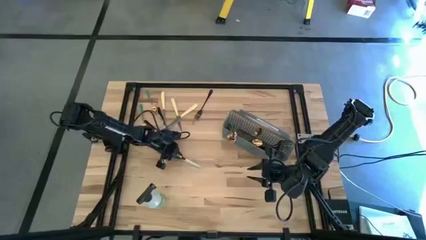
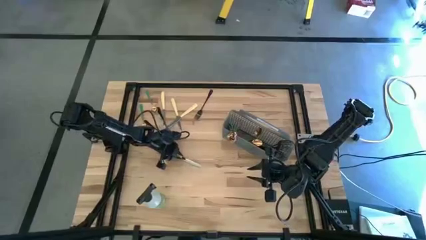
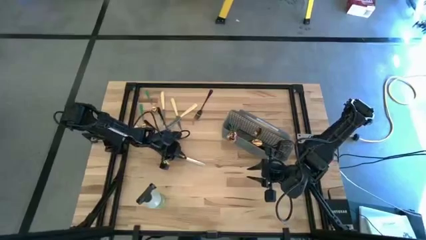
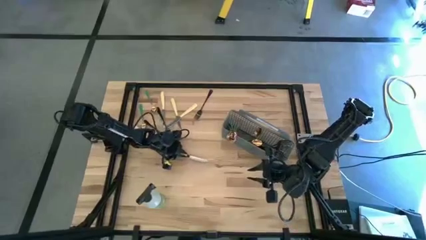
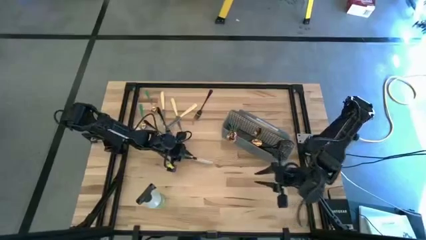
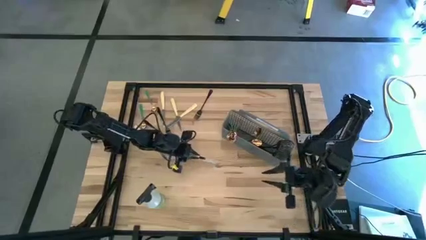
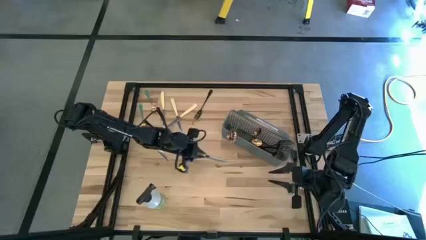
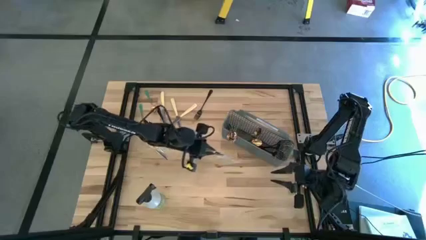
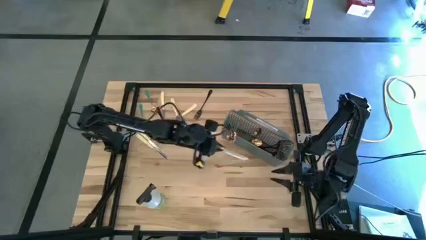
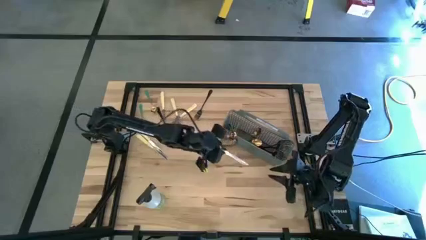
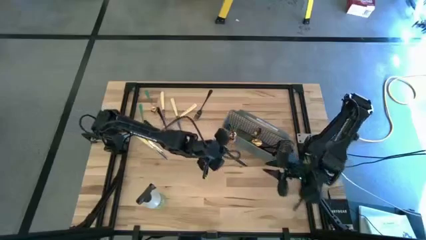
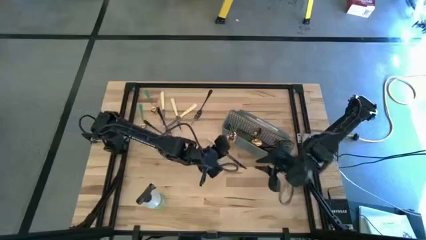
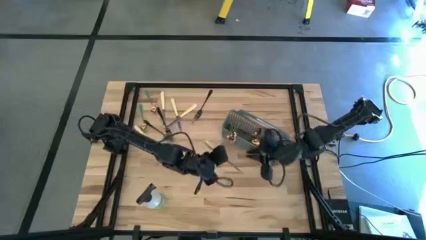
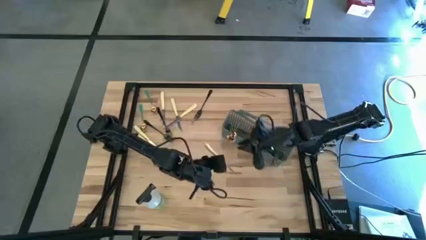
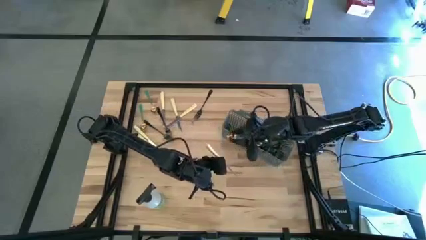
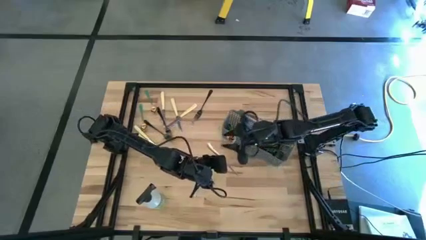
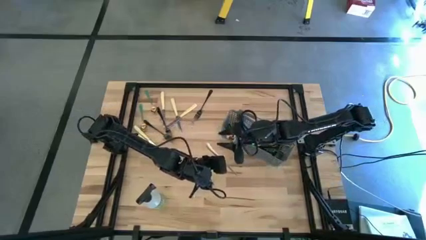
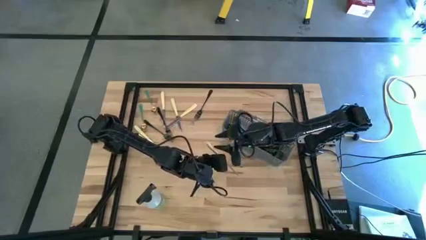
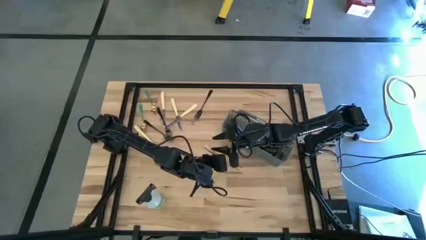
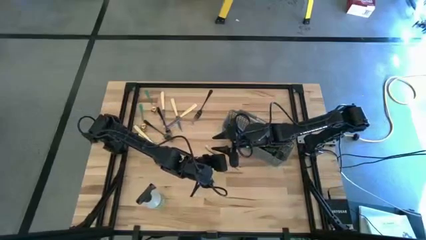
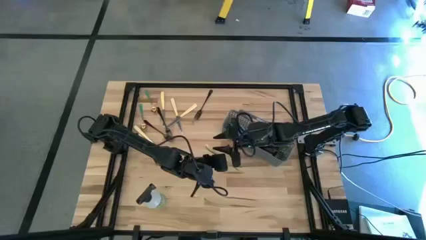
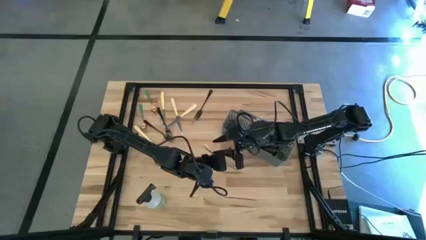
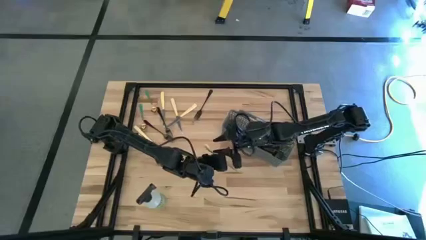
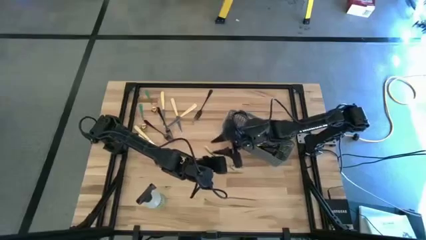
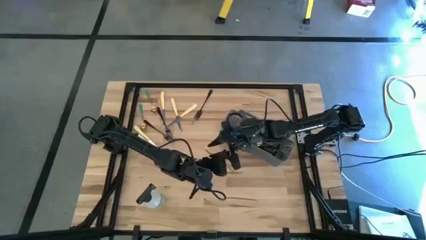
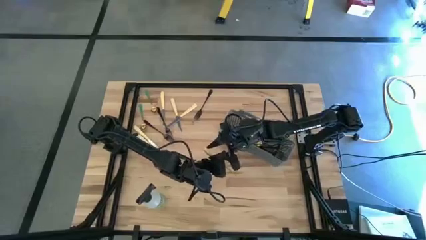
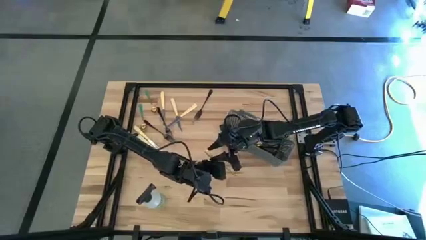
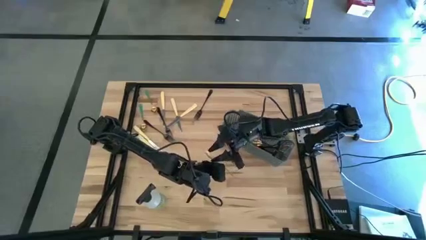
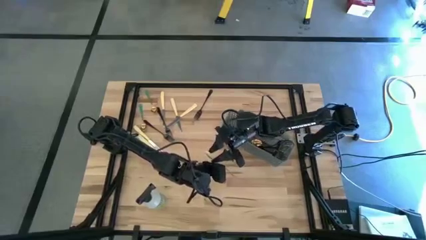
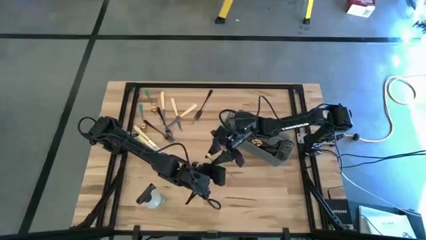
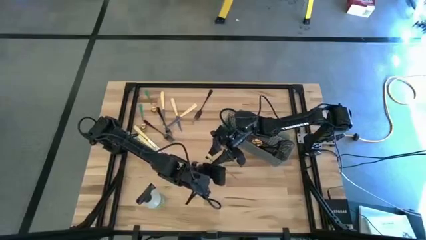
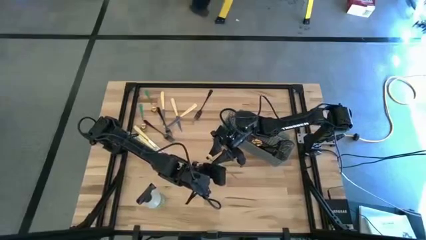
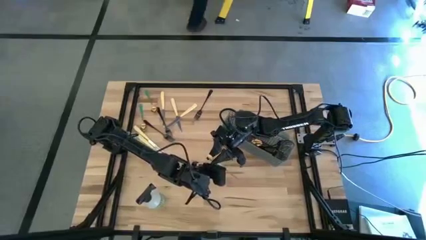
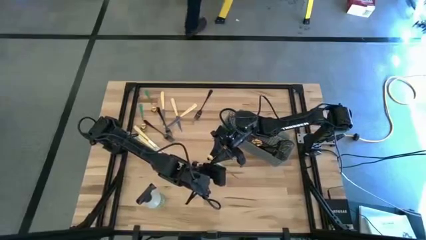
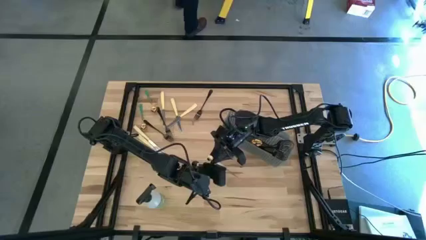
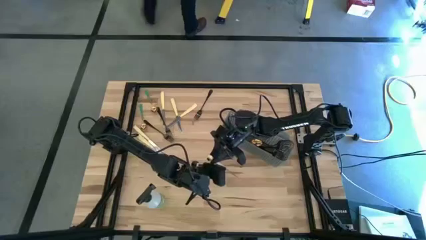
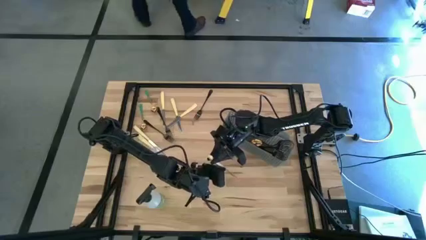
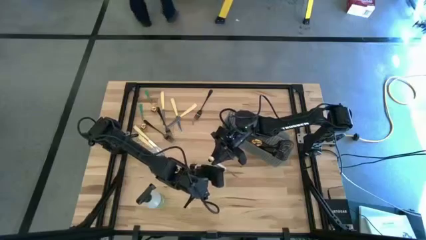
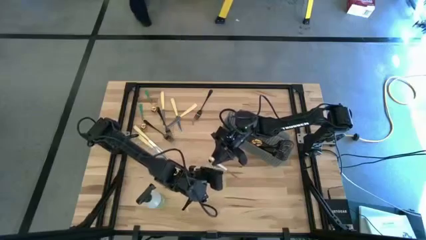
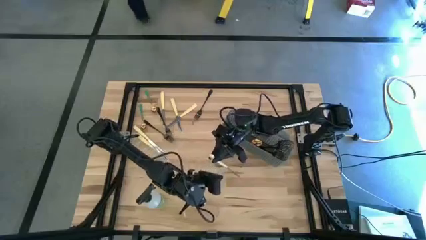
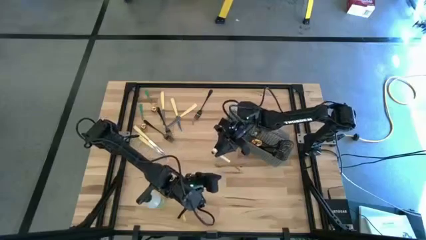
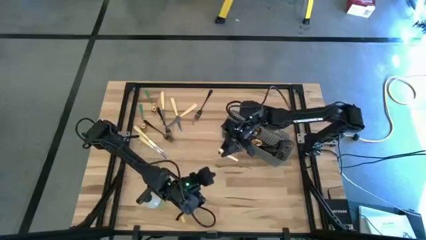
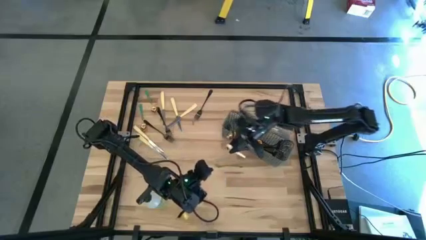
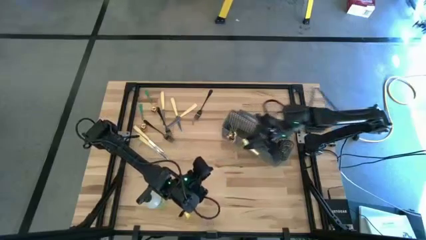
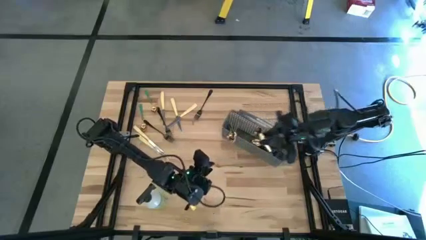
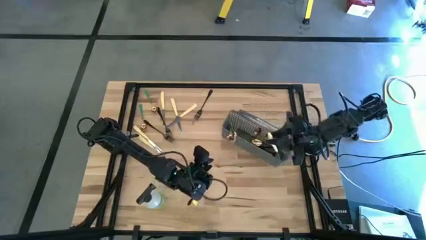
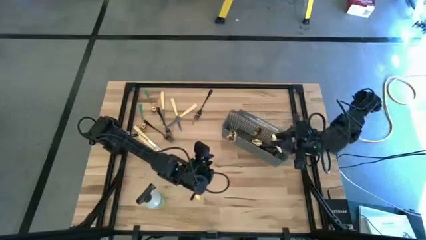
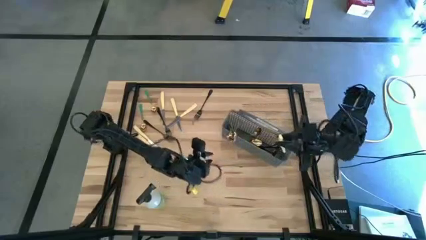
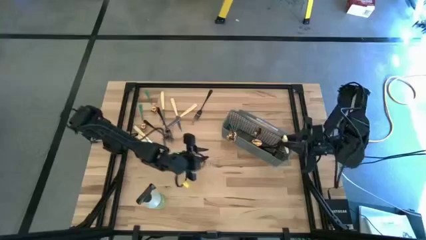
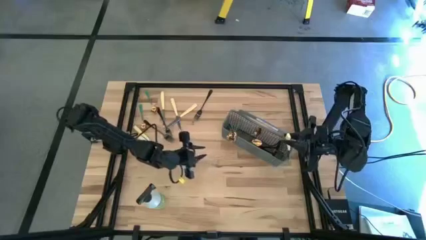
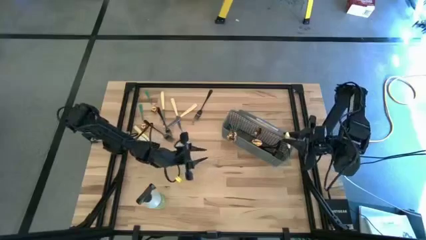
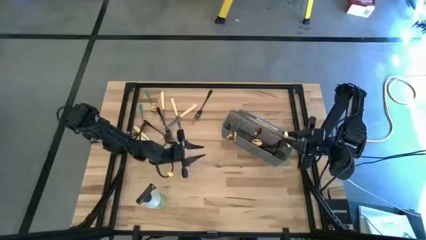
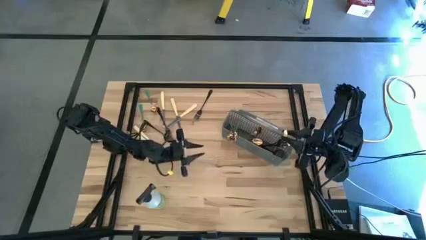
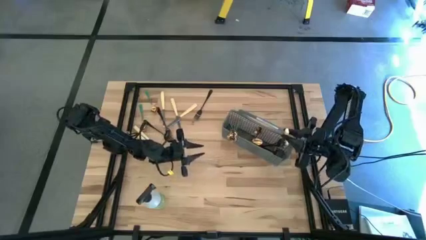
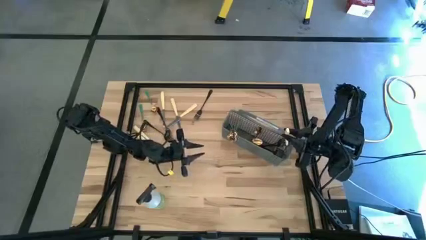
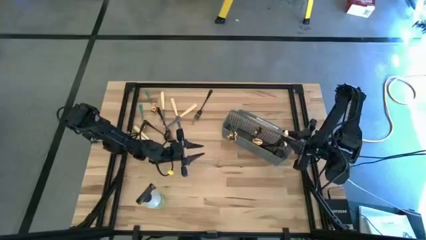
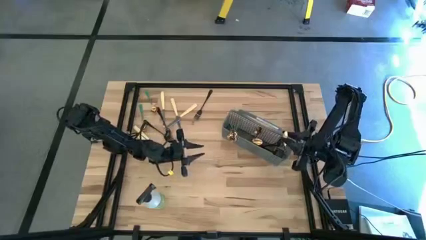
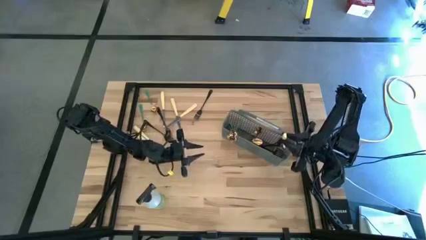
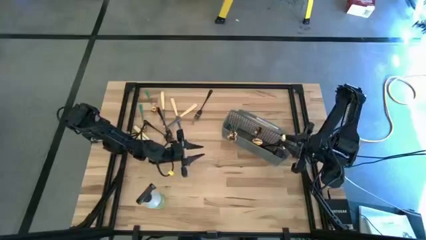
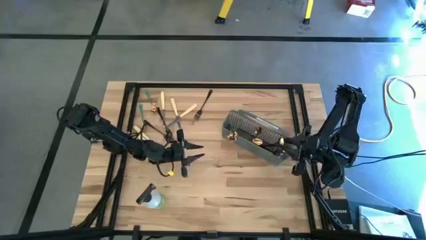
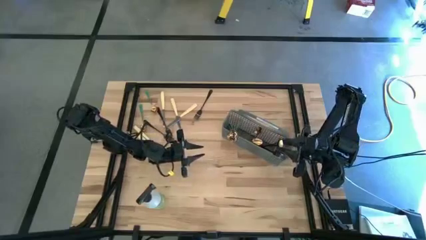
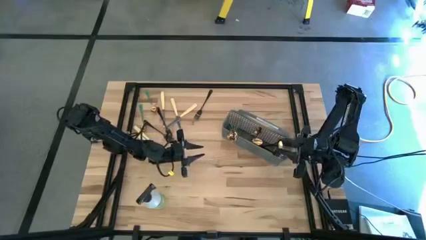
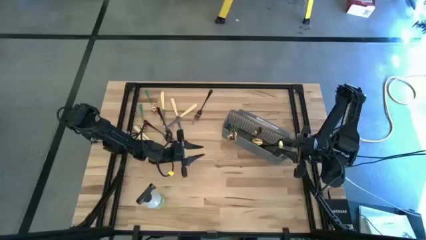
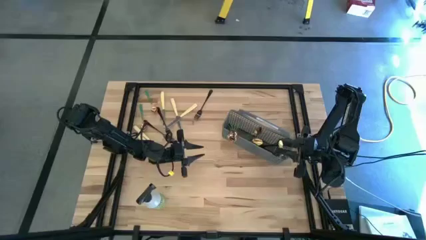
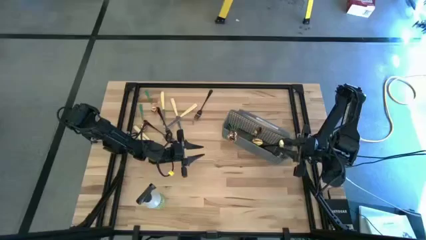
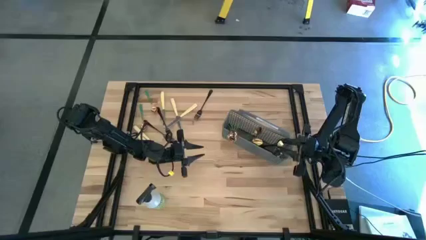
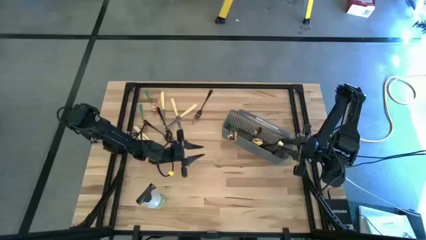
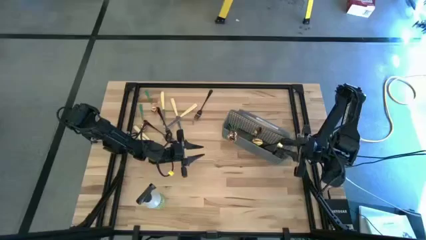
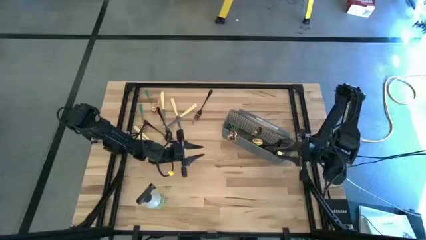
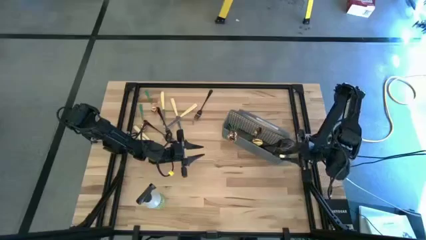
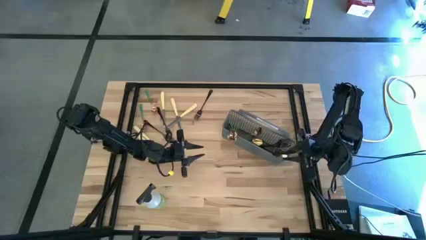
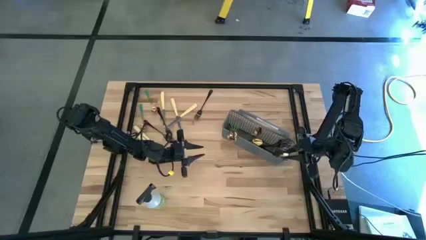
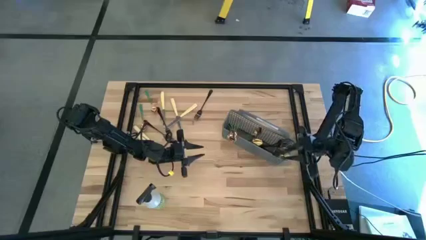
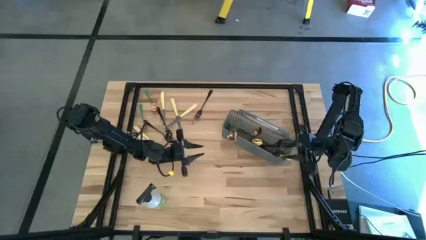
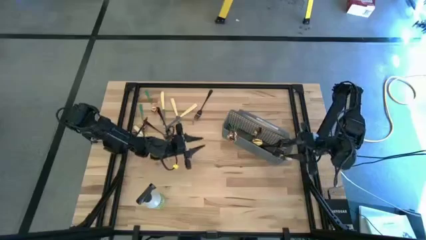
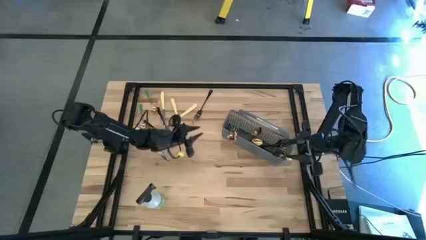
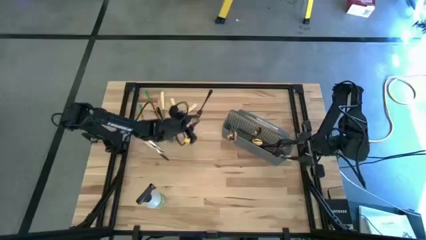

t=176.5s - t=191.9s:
Task: Sort silverware
Put the silver knife into the cutlery rack

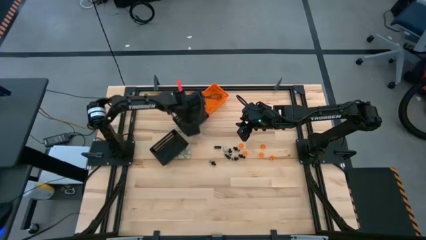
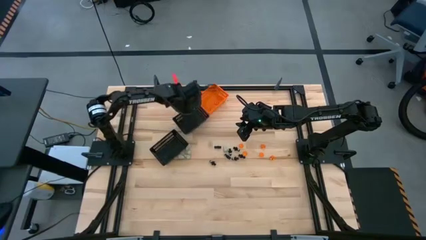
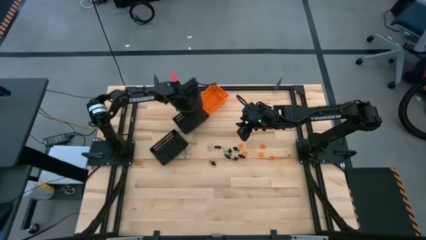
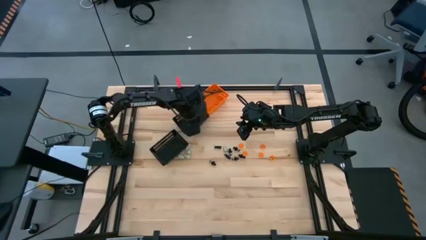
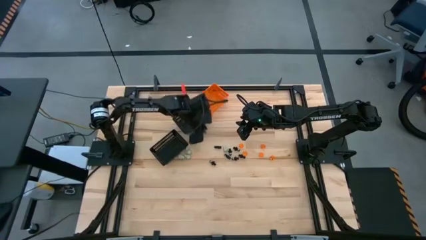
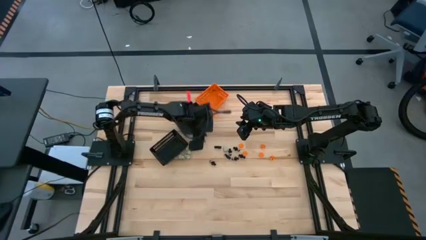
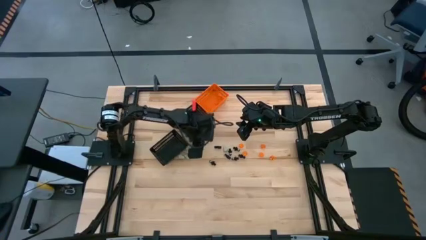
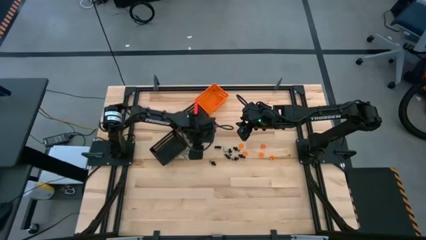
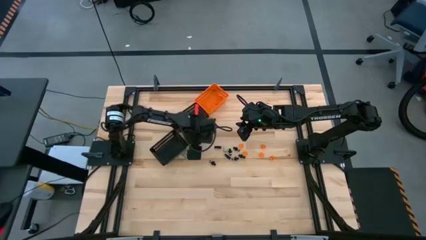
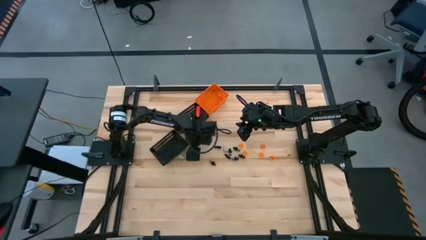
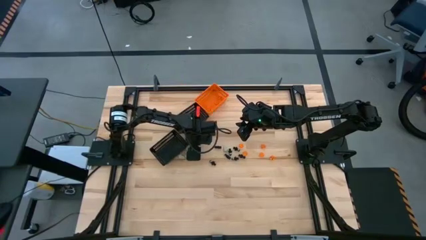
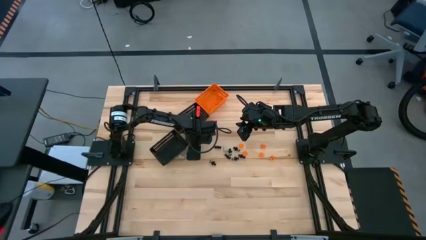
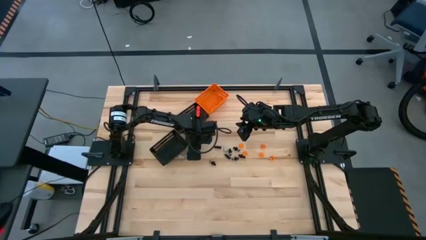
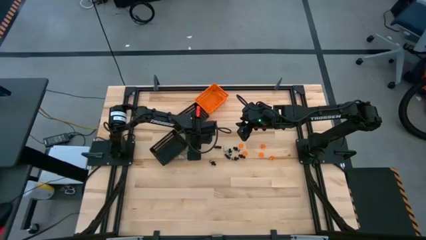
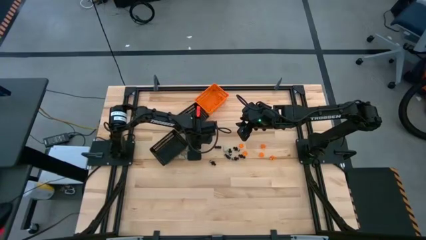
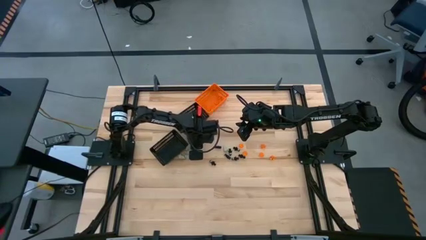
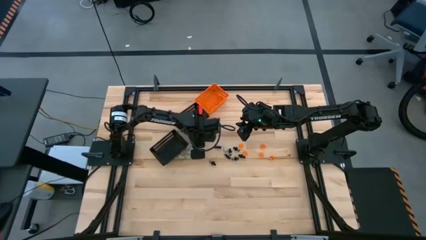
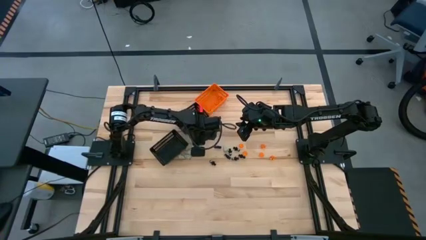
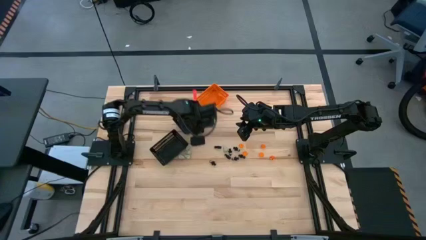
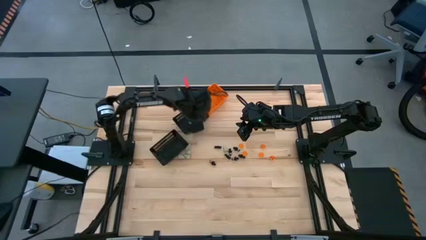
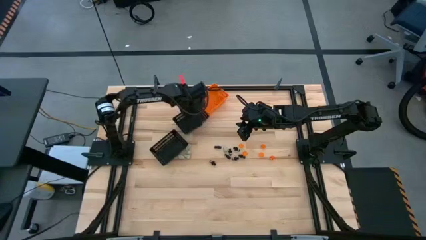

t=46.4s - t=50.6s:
Task: Sort Halloween decoration
Put the white skull toy into the top black bin
